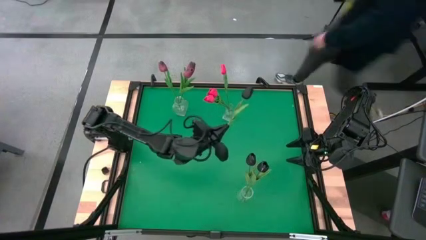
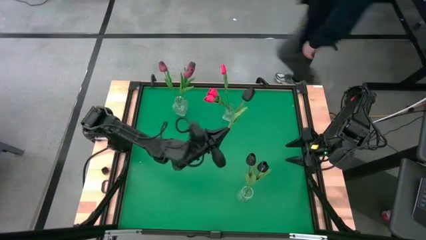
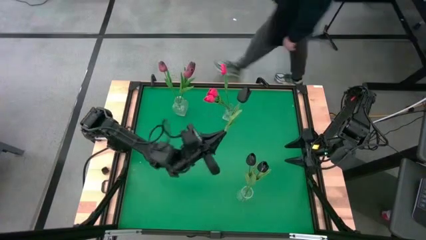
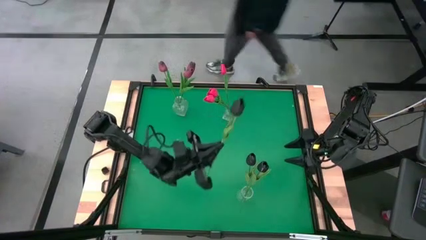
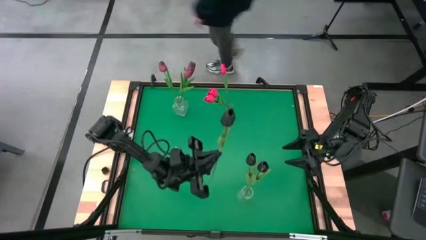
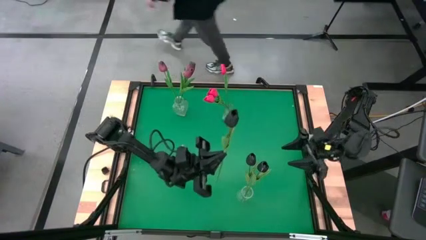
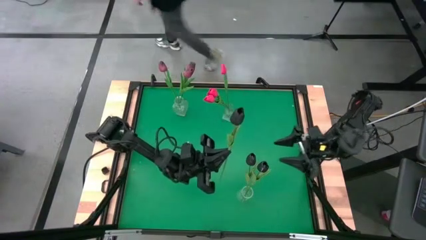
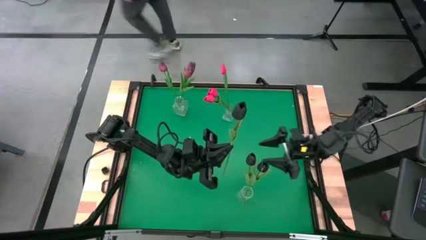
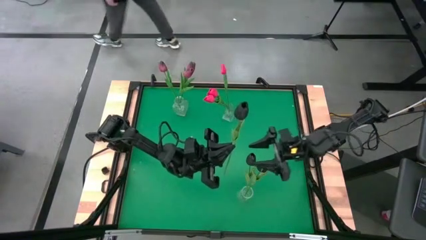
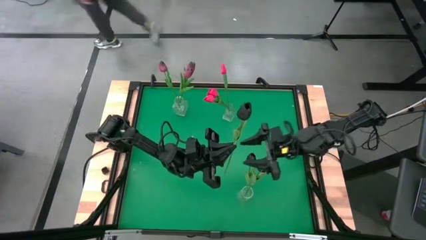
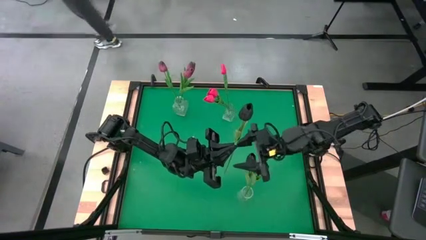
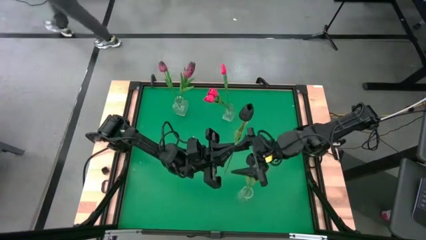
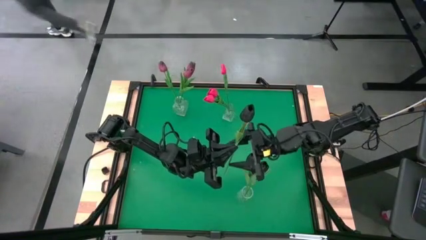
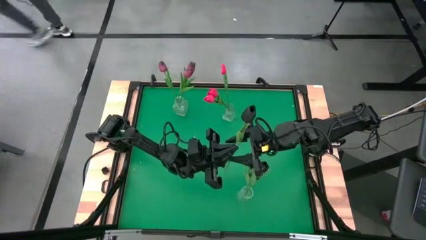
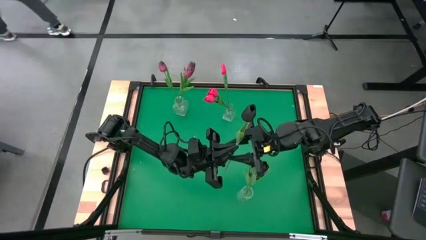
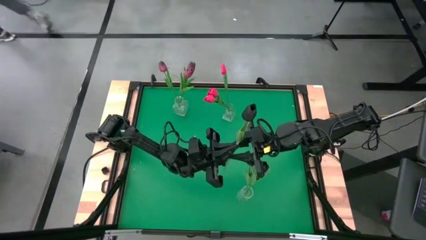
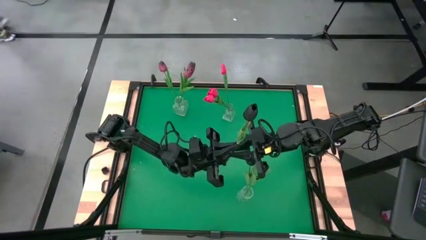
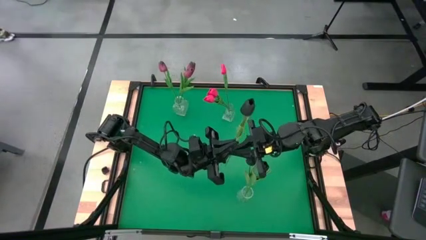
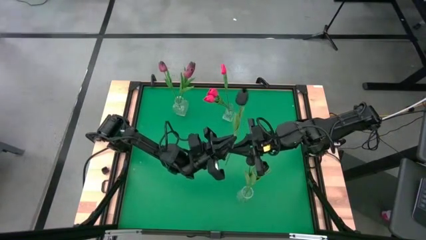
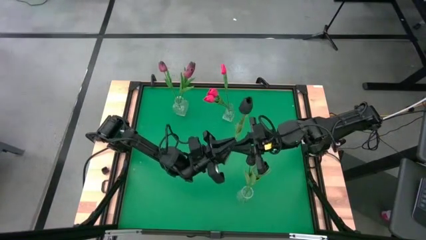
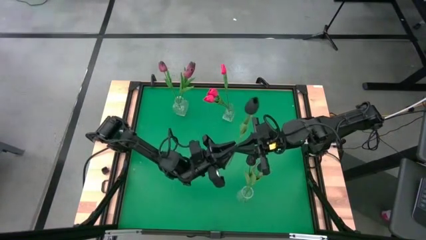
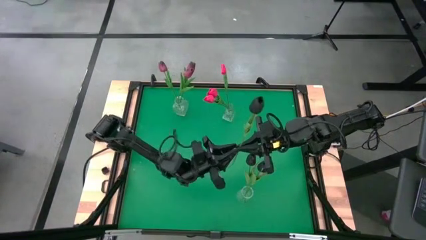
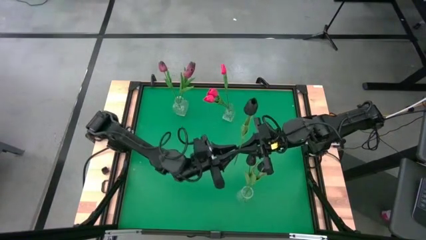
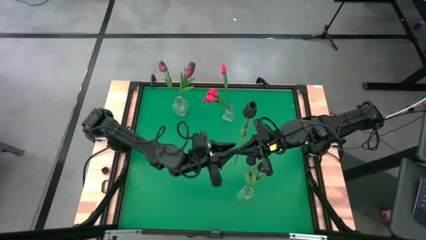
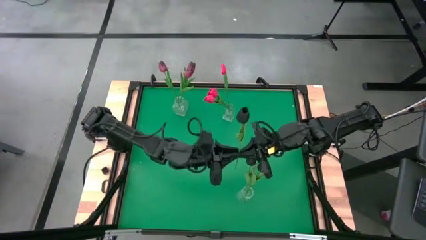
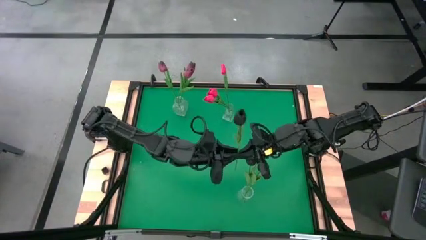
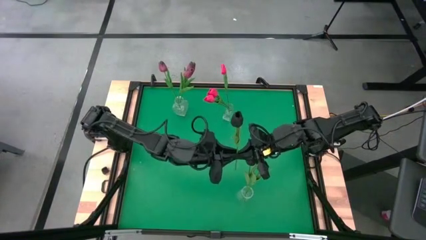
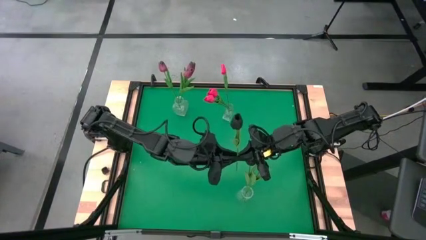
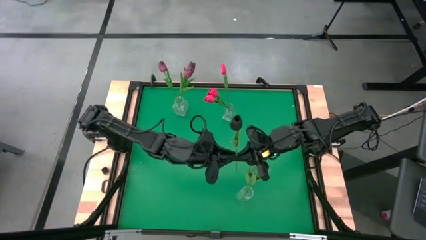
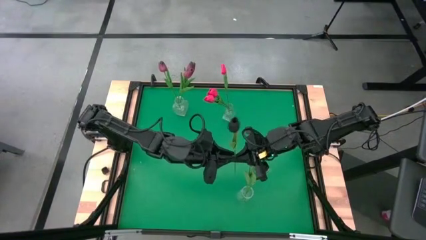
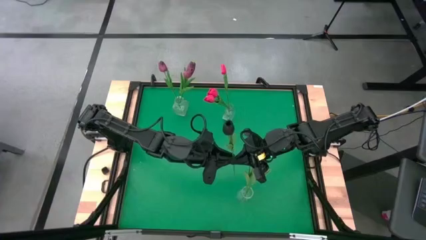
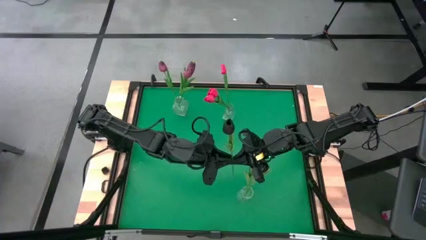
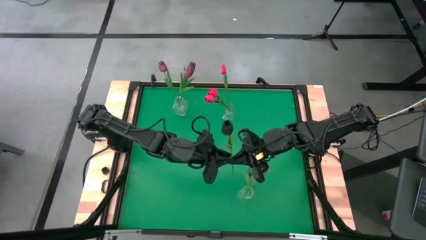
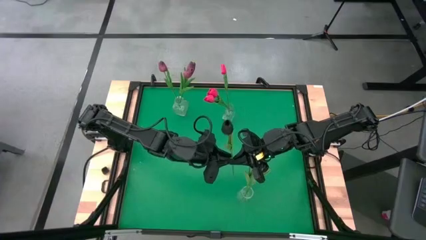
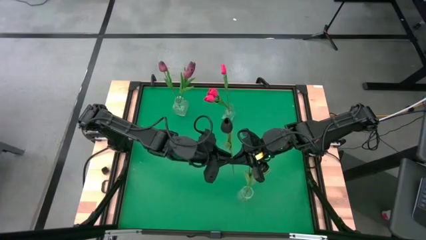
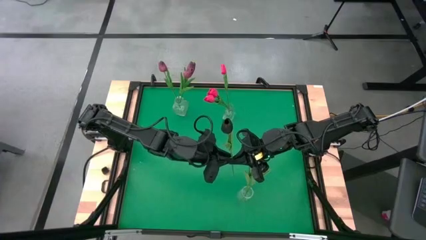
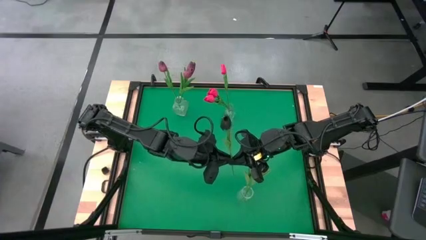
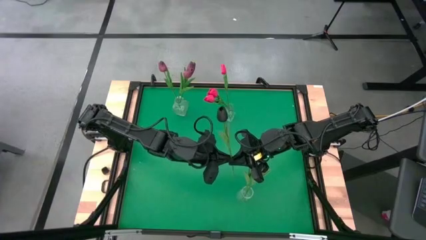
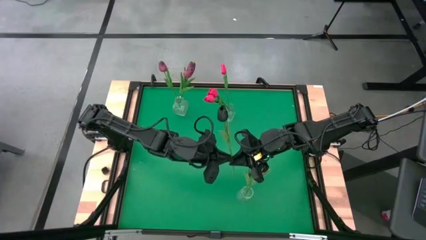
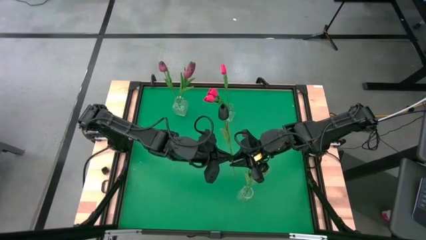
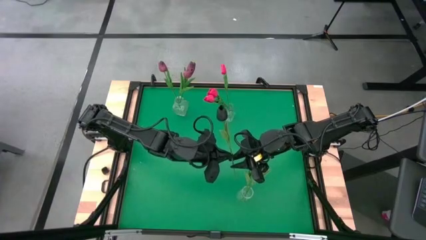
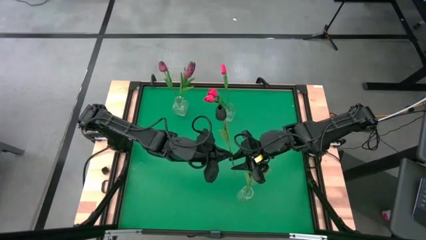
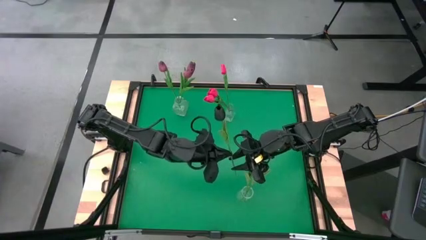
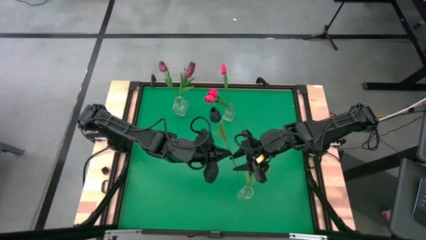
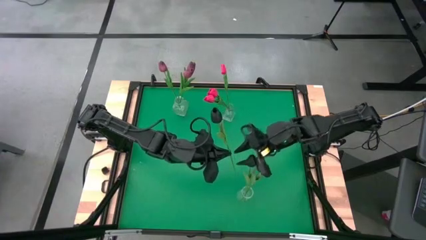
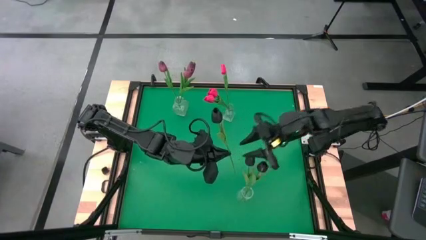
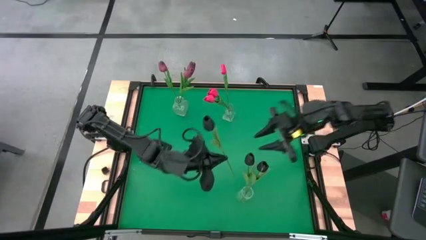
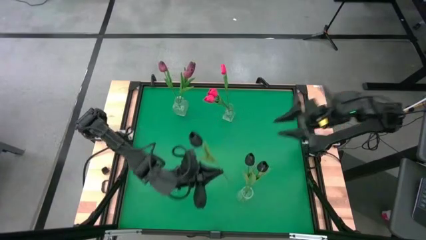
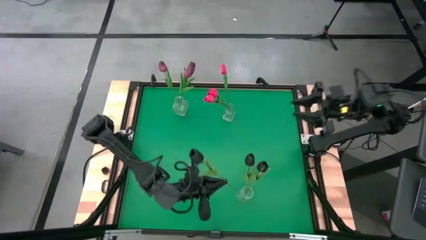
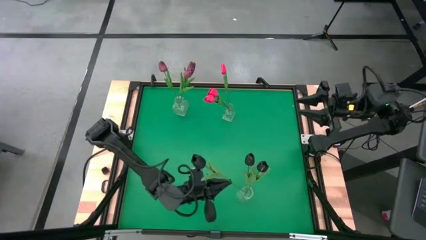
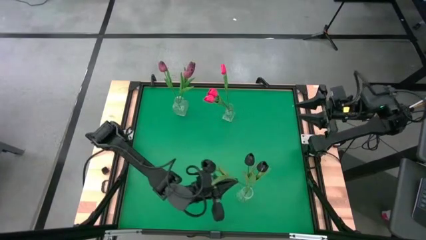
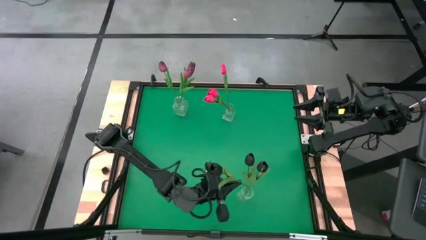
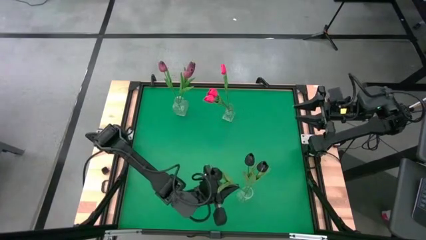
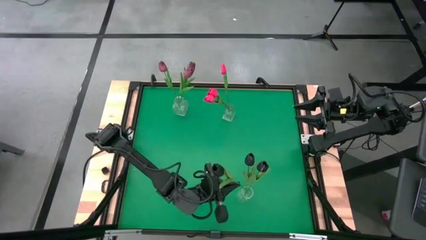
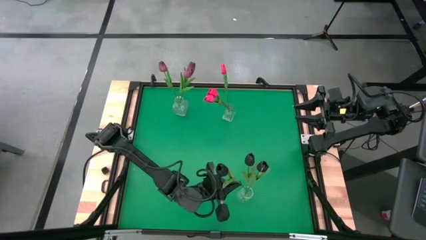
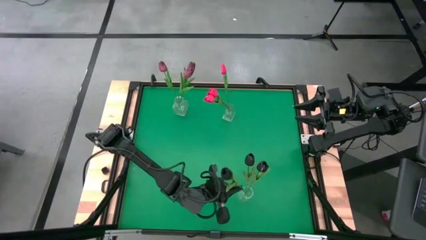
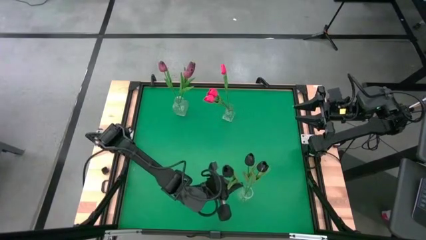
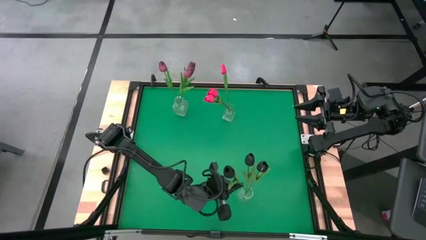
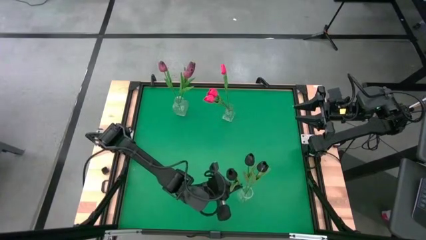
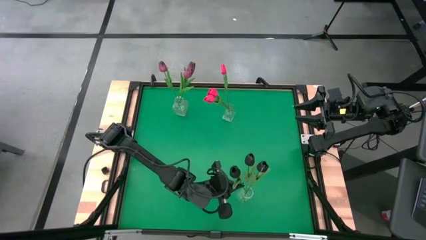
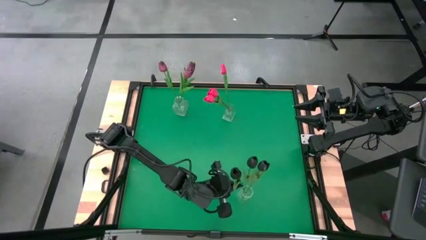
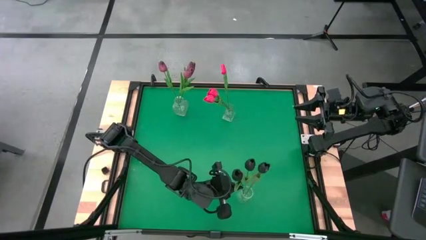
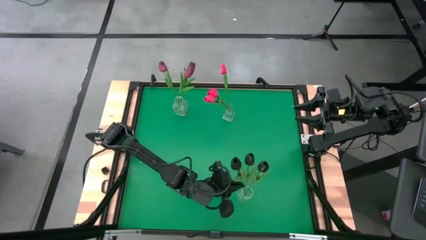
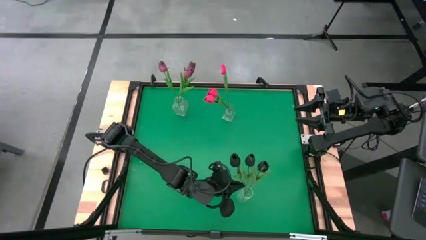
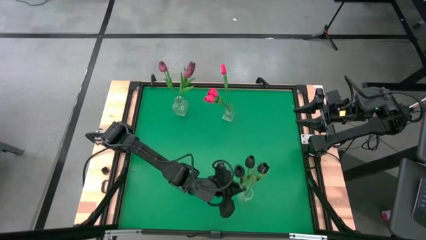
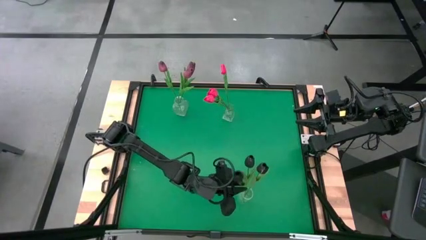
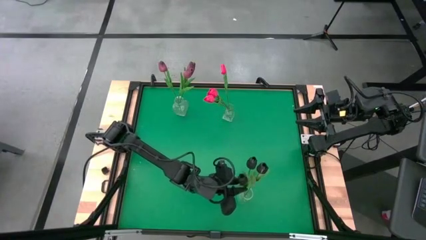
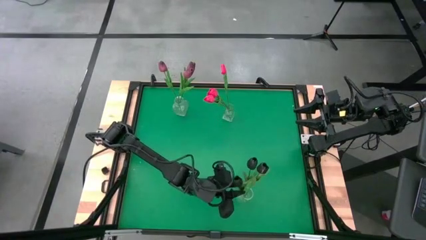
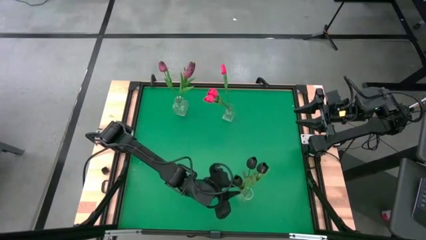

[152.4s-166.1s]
Task: Sort flowers into vase by color
Put the black tulip into the bottom transparent vase

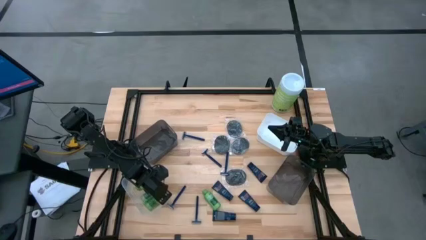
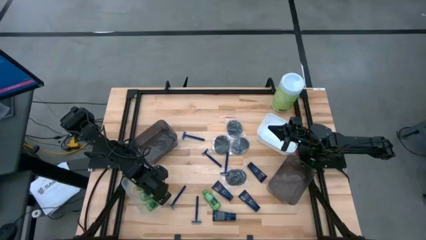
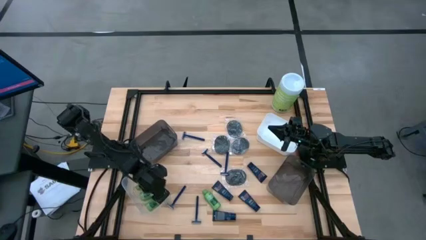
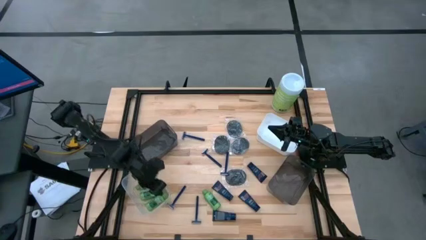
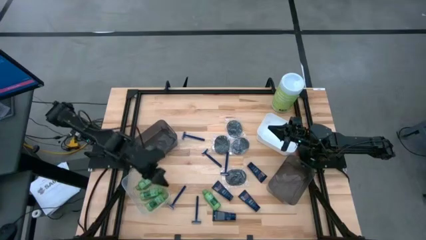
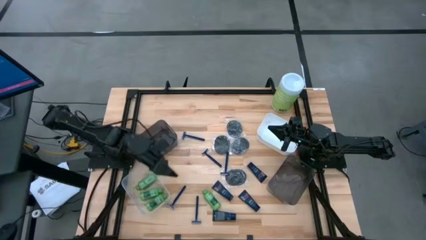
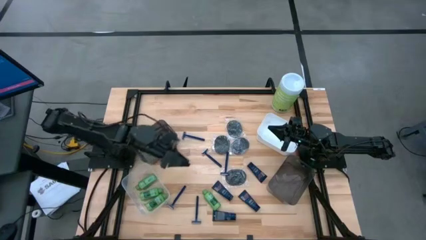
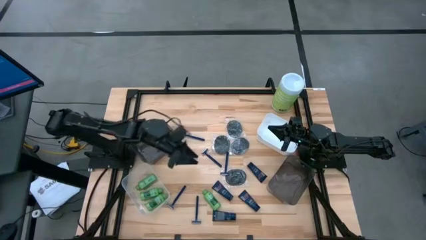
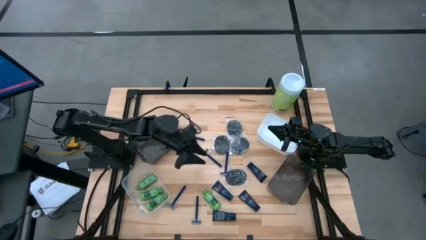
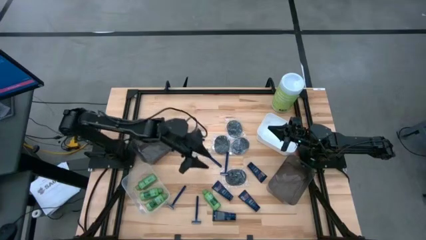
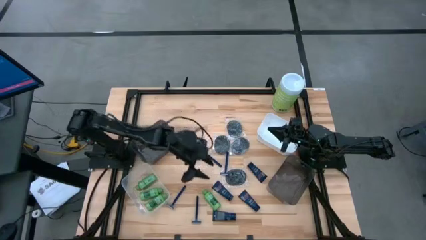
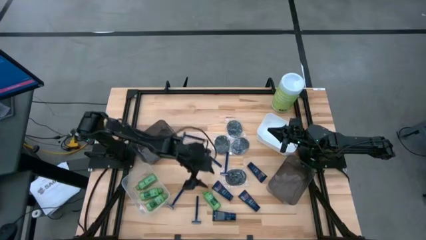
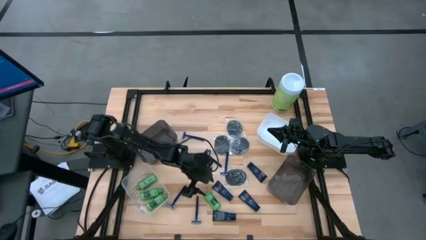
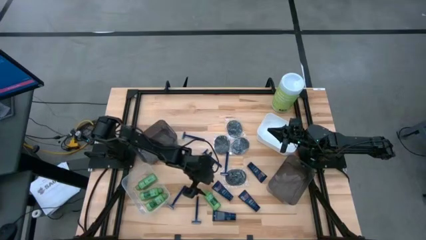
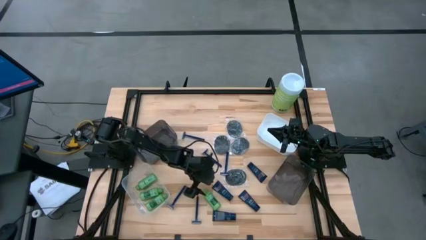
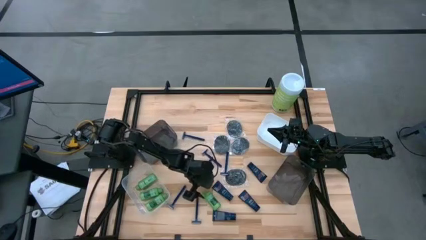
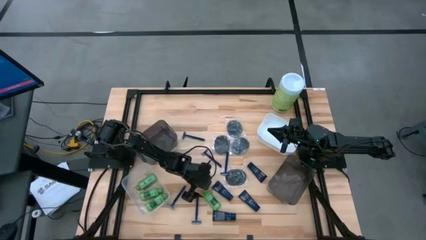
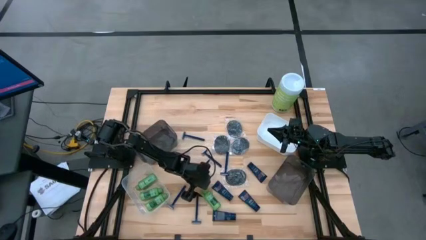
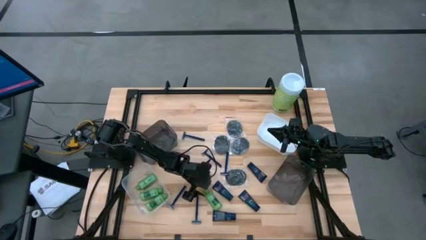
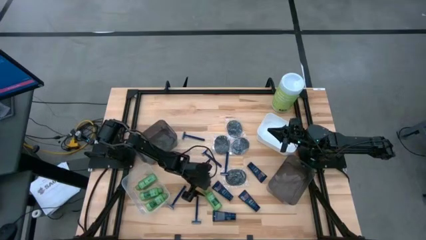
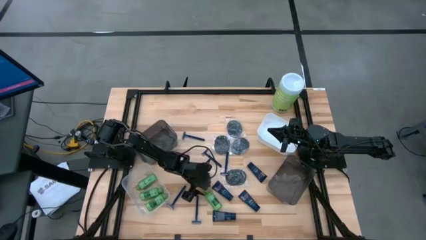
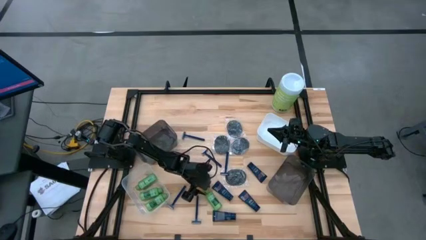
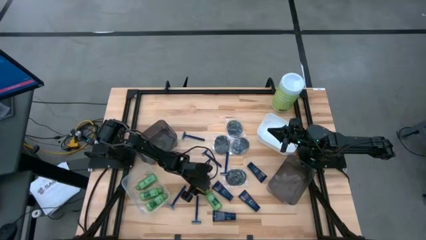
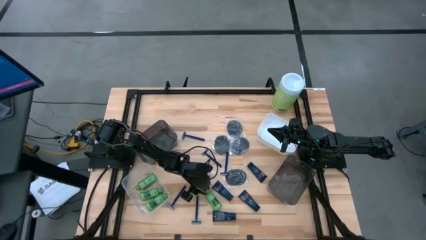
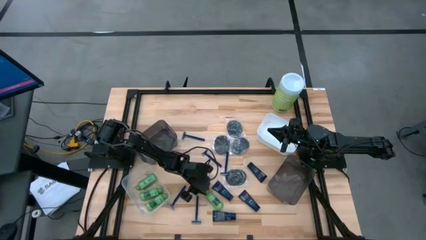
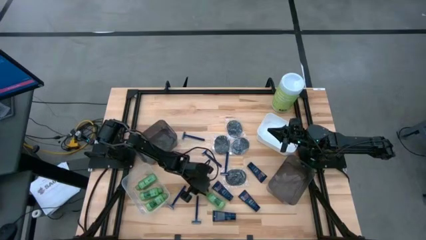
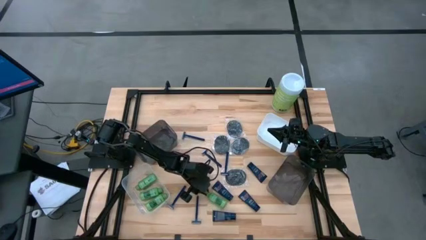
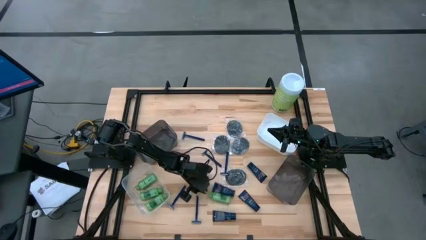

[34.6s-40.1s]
Task: Pick & Place Travel size toiletries
Put the green shampoo into the transparent bin
